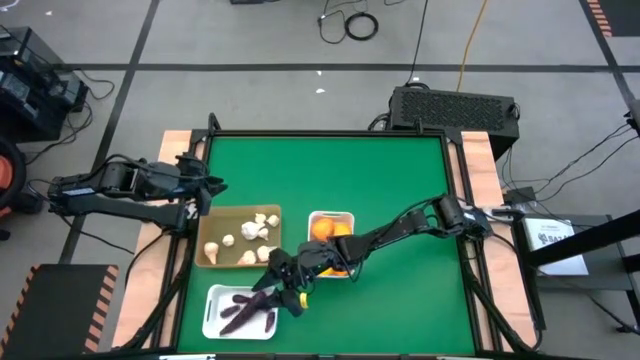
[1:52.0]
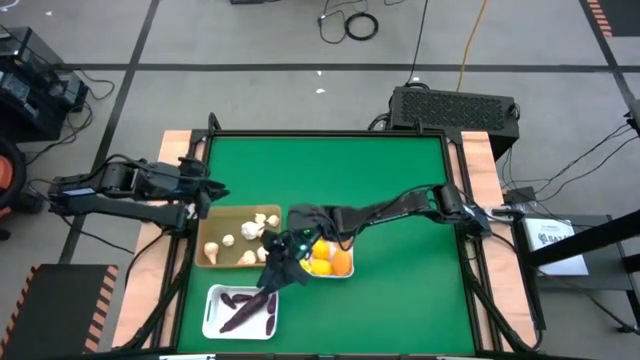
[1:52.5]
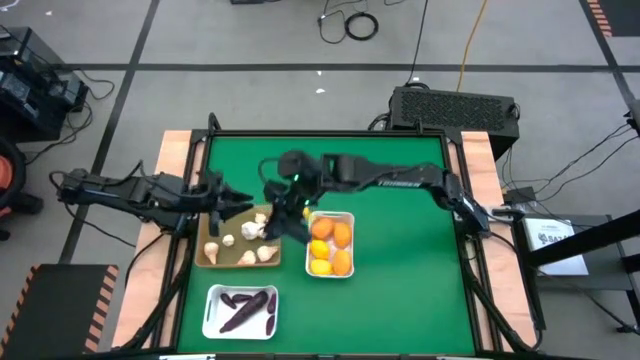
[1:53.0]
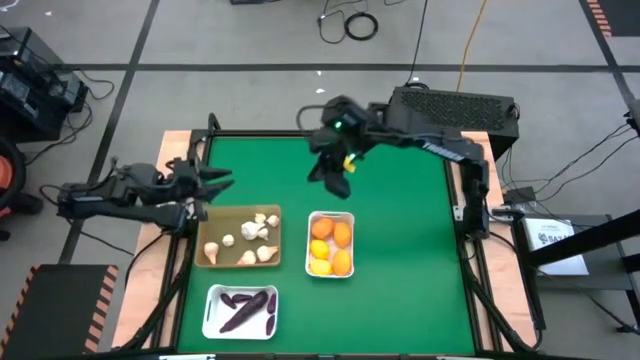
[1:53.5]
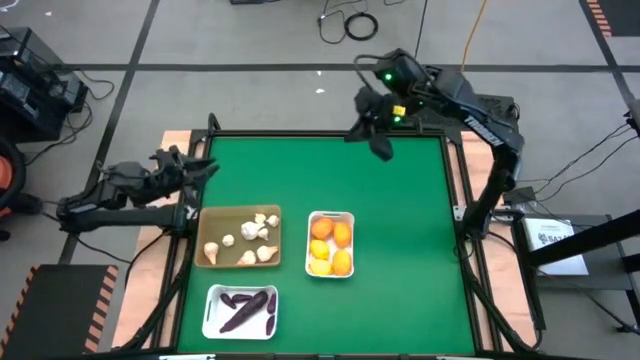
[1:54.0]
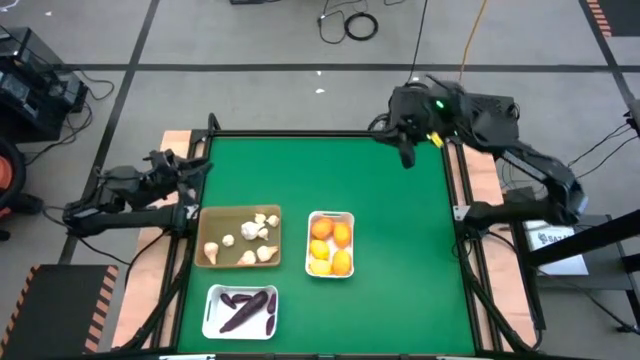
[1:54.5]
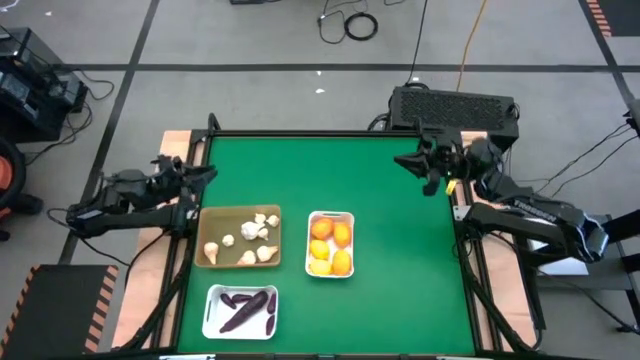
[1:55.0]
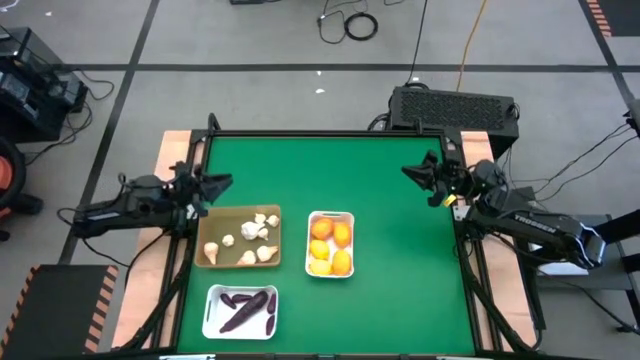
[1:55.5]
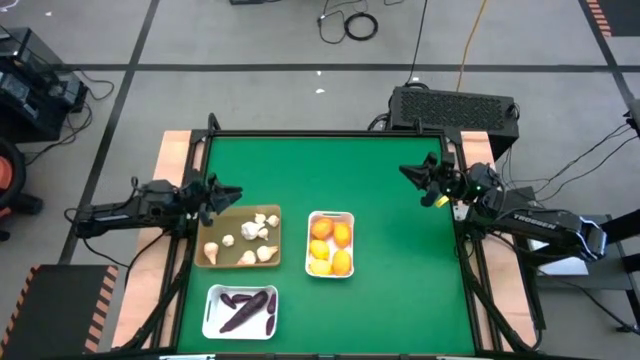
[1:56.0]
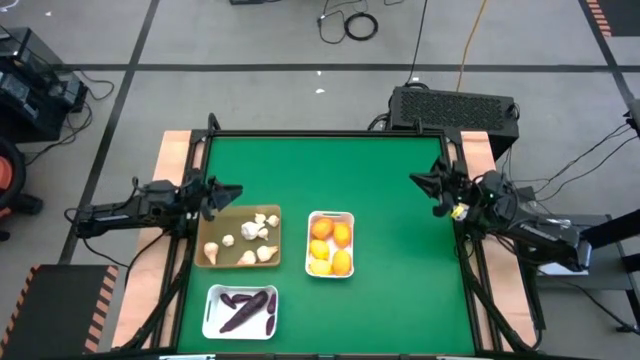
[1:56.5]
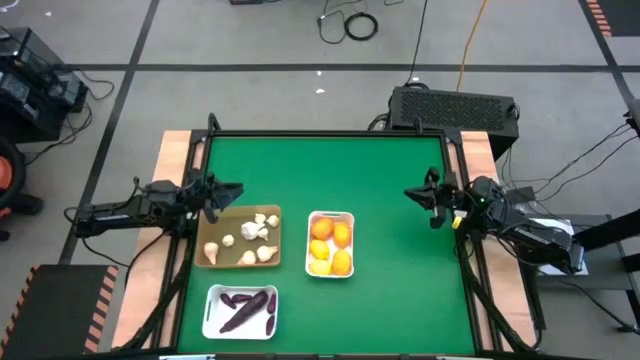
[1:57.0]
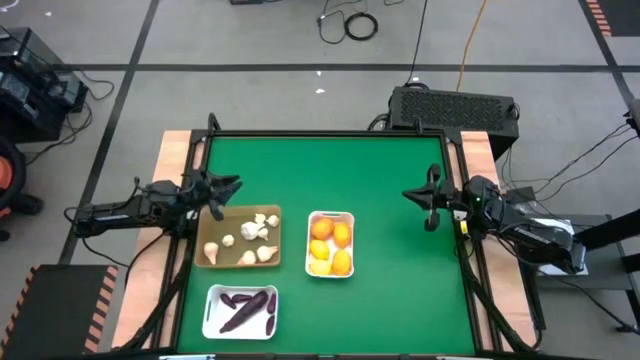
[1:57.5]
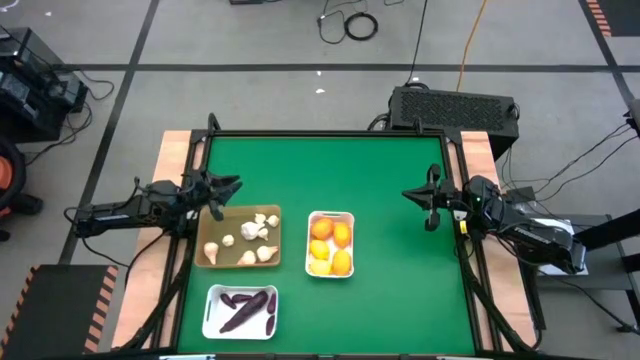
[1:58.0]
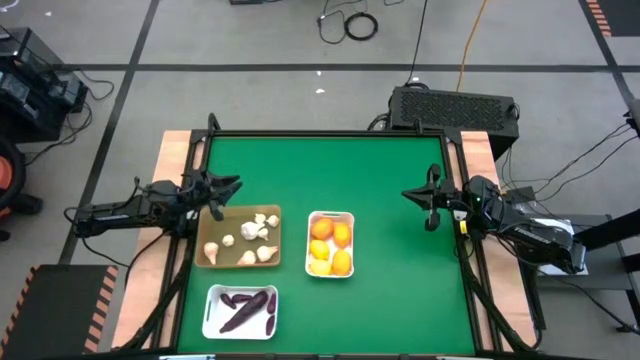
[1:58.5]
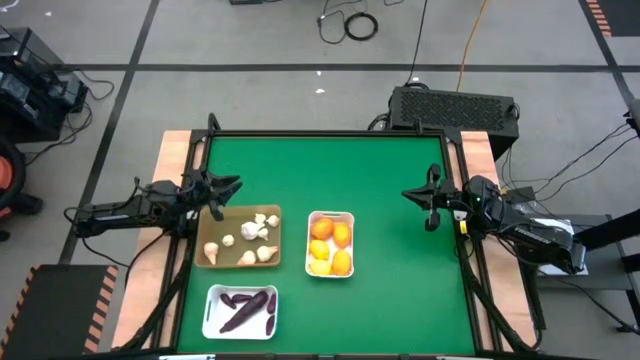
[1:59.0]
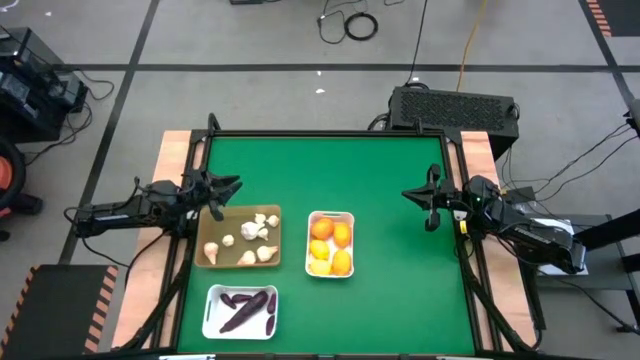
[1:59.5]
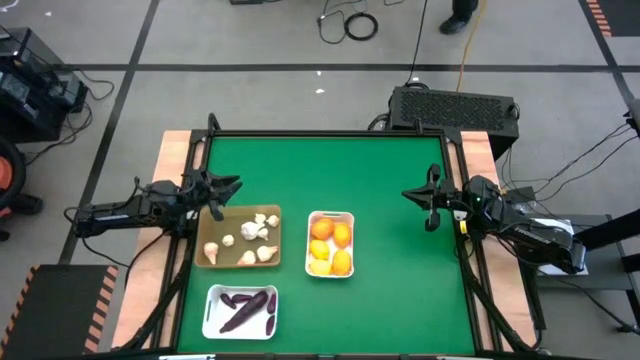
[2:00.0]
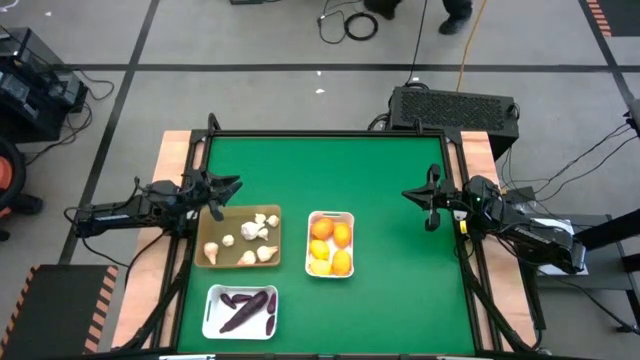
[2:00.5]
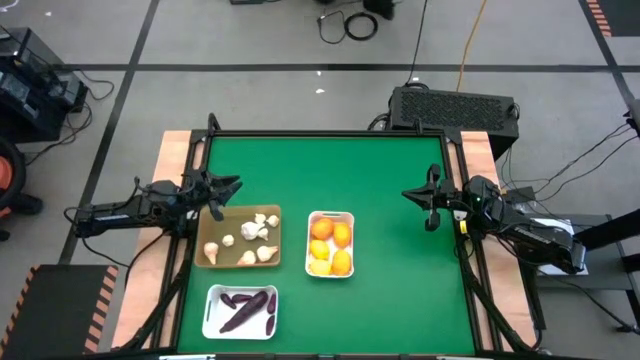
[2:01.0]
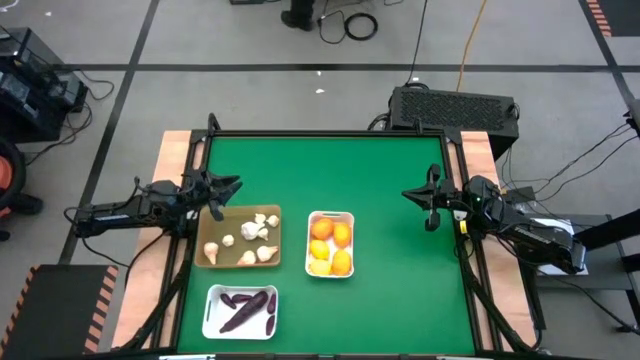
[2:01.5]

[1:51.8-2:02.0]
Task: Sort produce into baskets
Return to Home Position

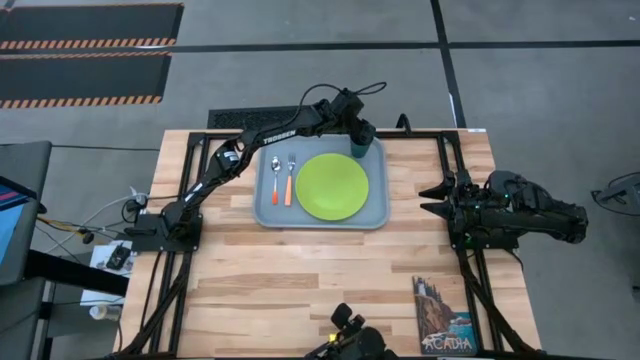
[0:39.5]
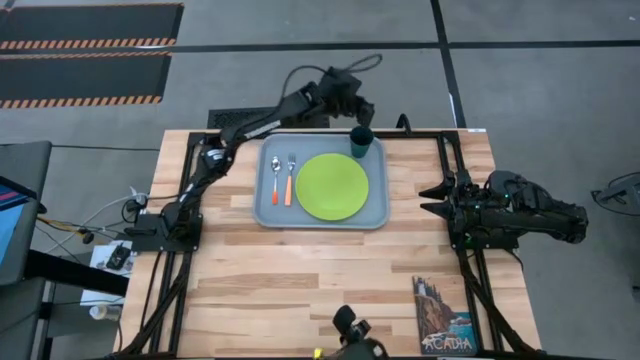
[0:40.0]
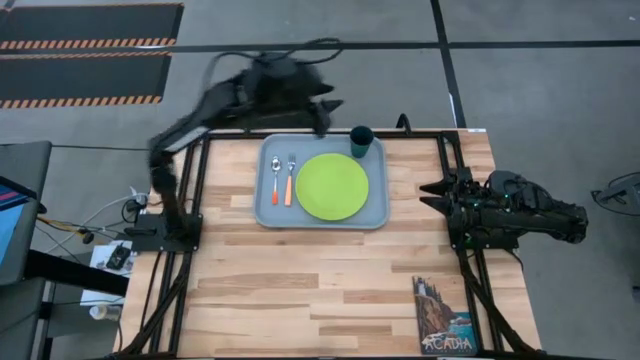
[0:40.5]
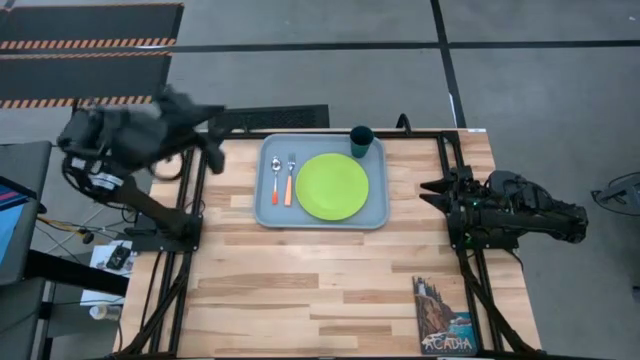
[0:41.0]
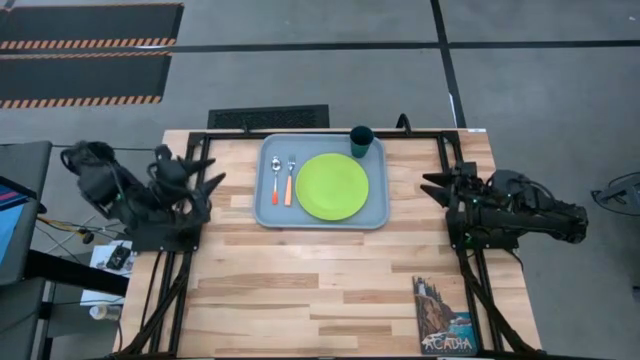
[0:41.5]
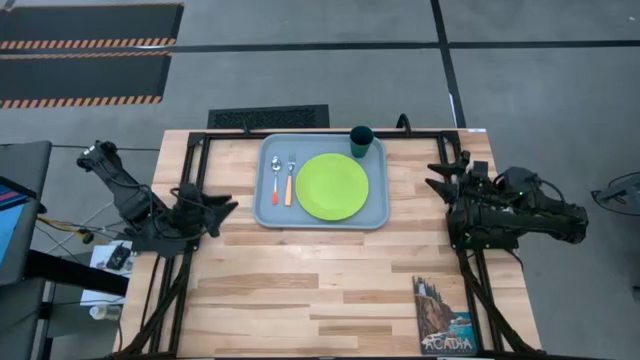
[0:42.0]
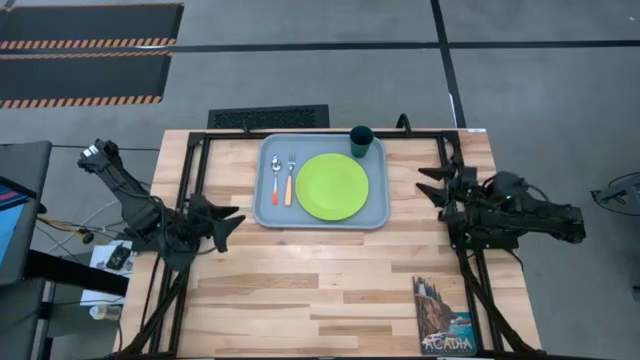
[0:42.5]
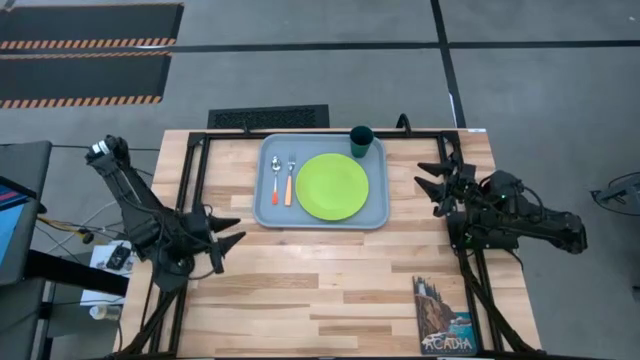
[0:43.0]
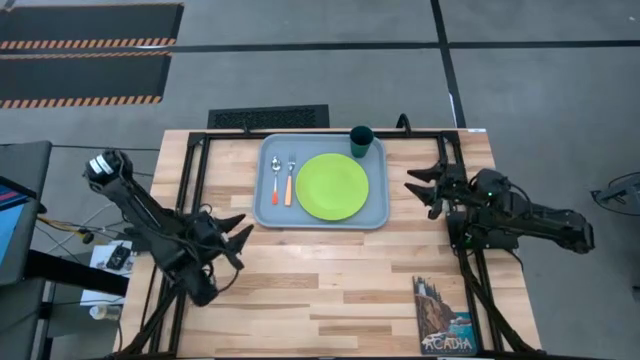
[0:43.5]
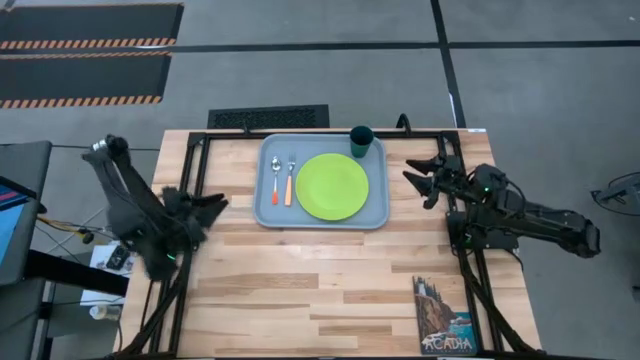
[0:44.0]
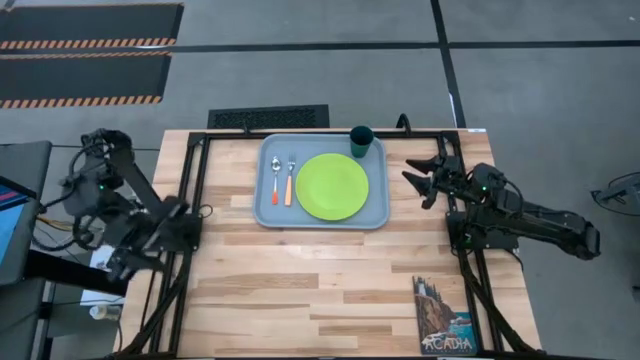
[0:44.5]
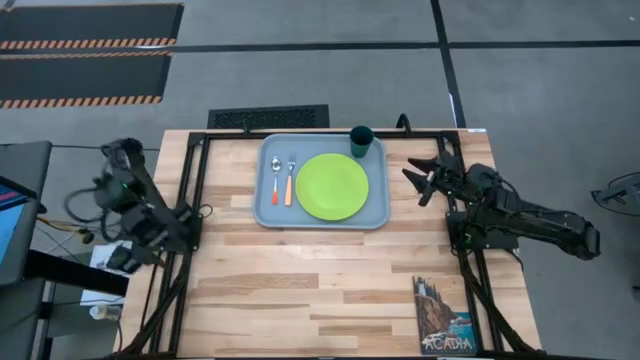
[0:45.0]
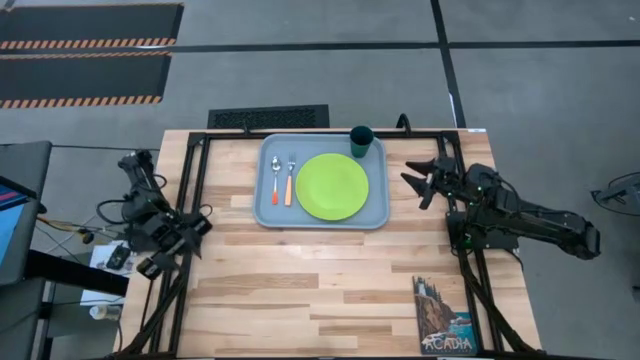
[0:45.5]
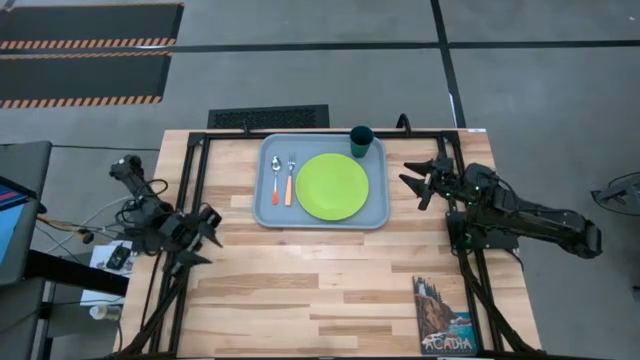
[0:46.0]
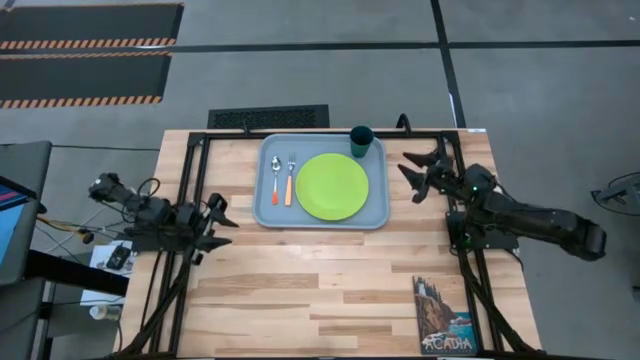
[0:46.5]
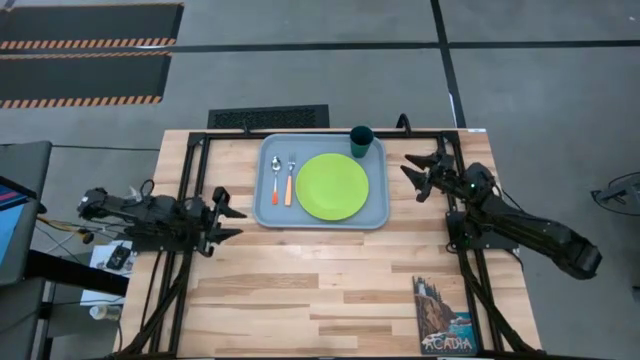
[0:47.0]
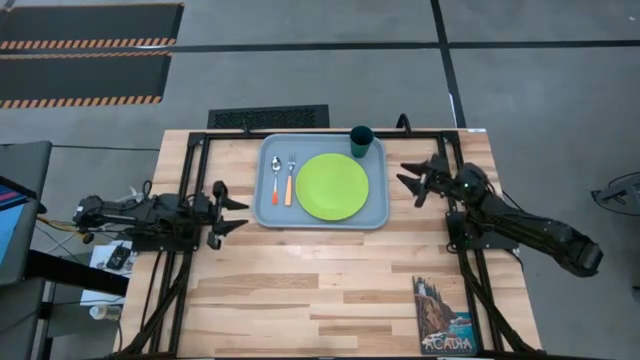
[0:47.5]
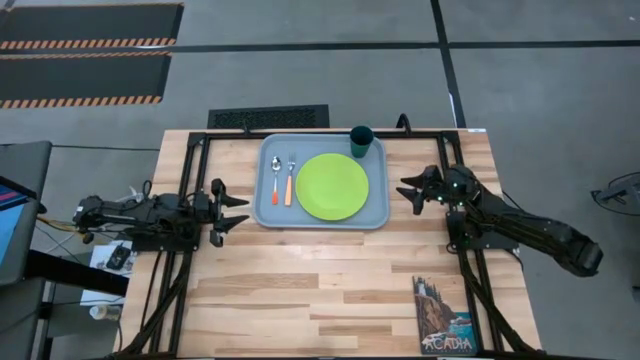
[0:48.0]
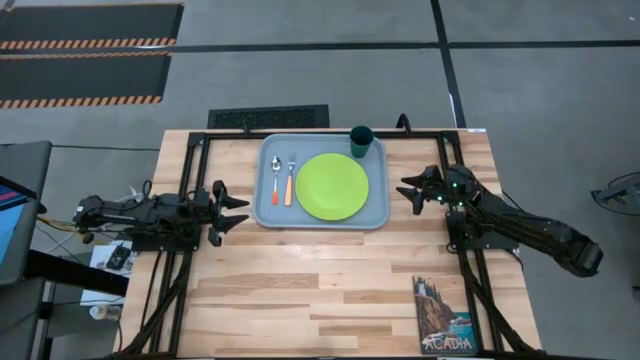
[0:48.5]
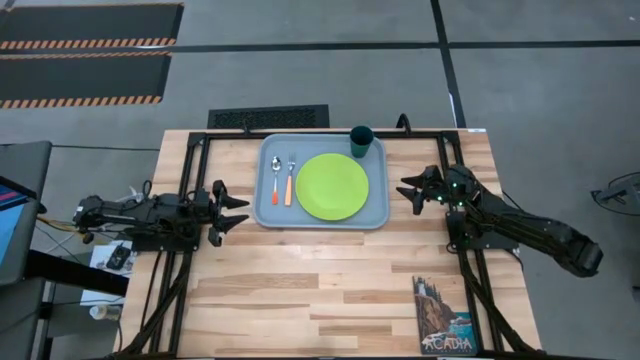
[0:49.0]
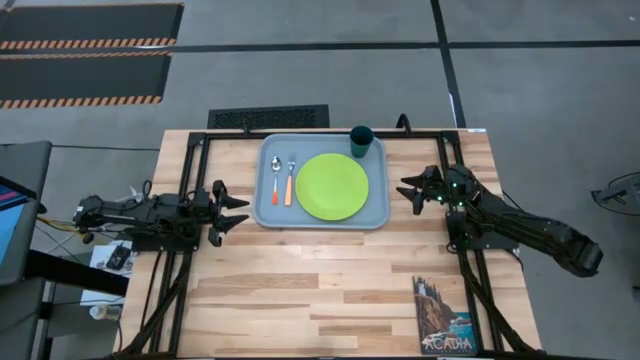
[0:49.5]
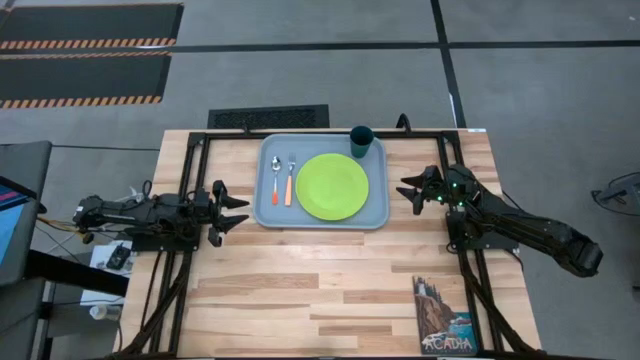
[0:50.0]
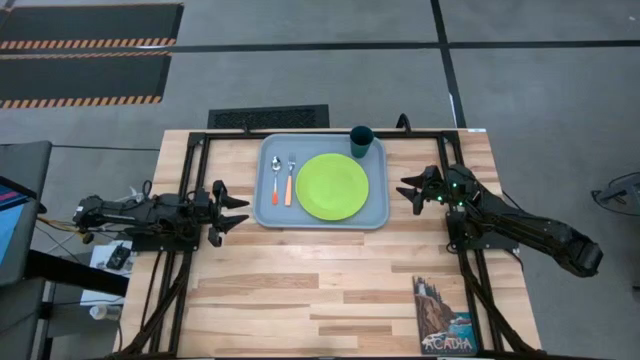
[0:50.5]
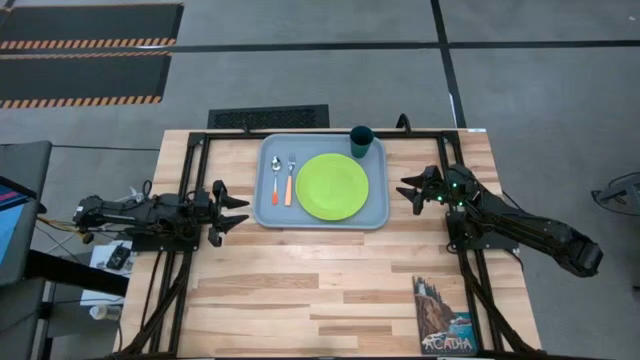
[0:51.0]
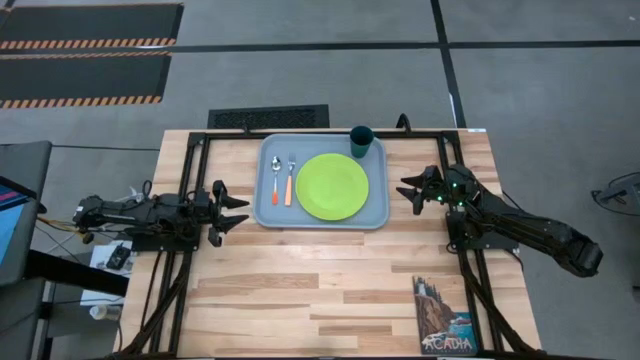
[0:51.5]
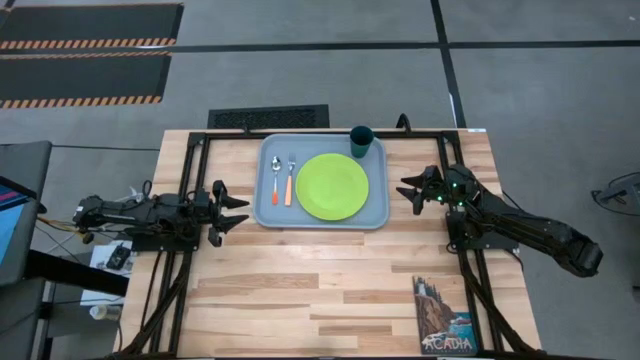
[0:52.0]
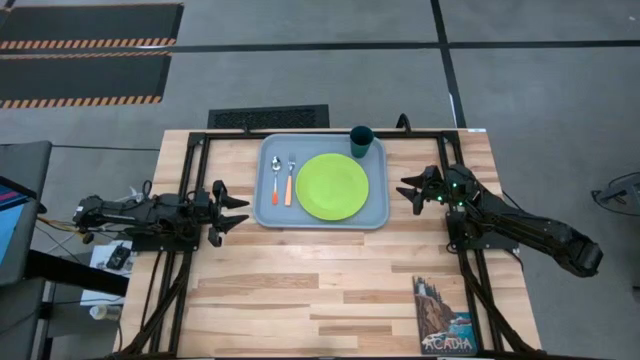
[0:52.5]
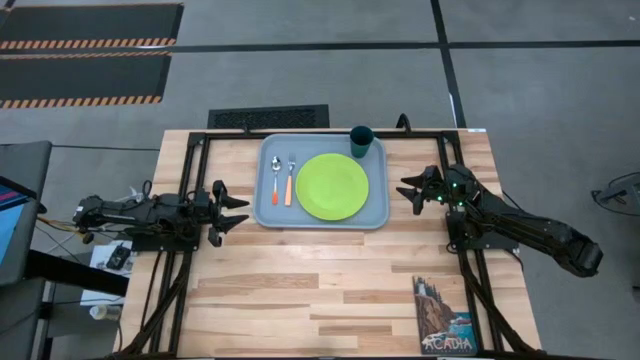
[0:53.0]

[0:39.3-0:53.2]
Task: Pick and place plate/cup/fork/spoon on tray
Return to Home Position
